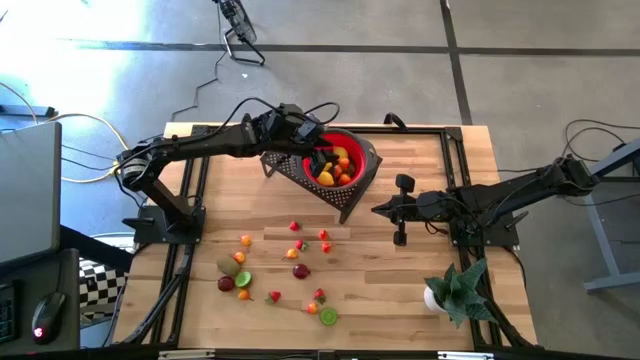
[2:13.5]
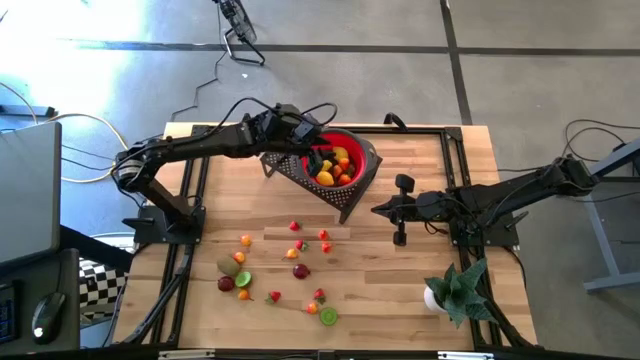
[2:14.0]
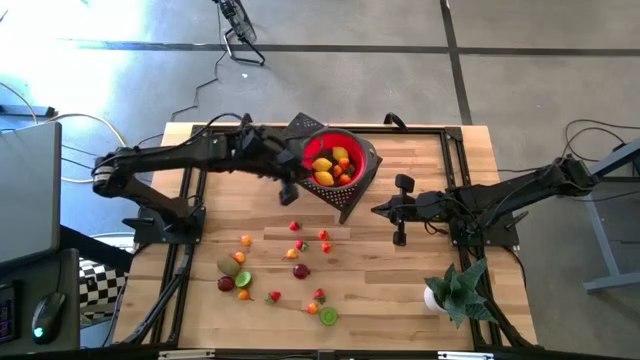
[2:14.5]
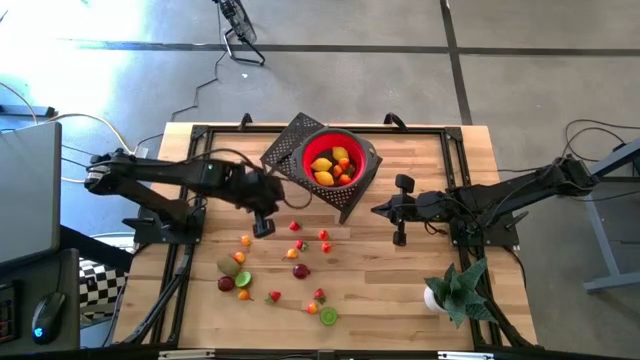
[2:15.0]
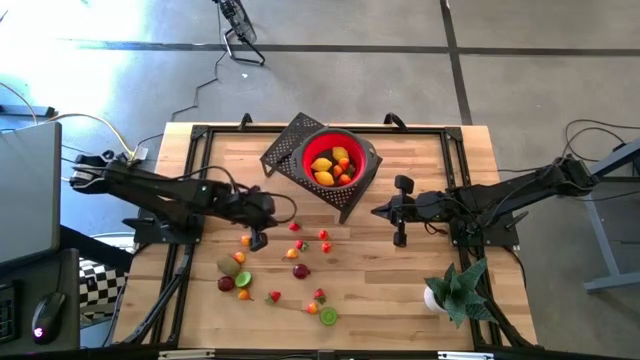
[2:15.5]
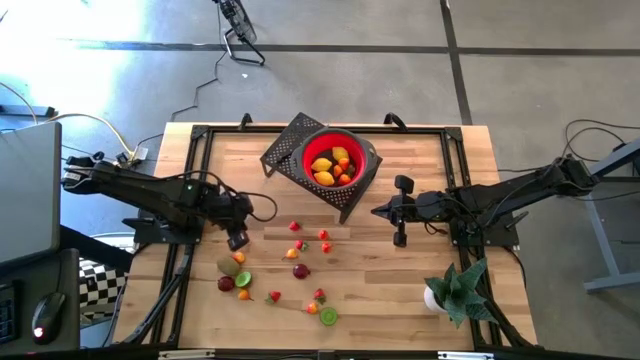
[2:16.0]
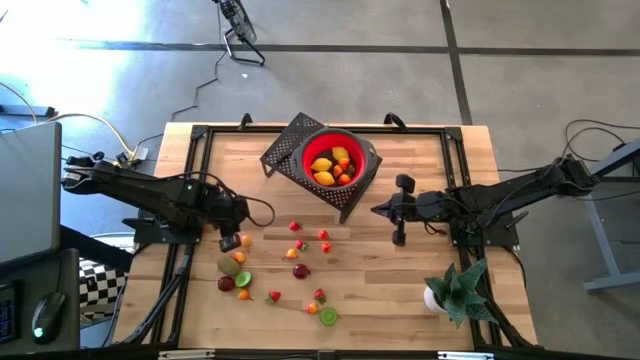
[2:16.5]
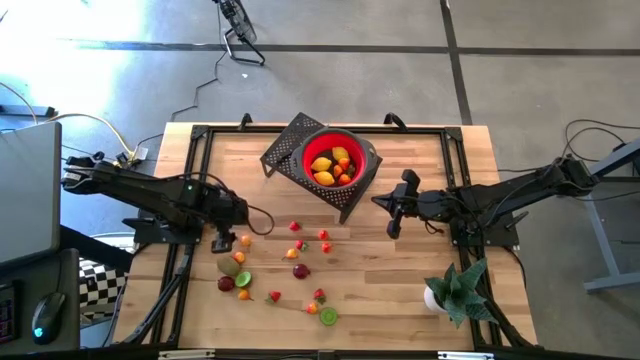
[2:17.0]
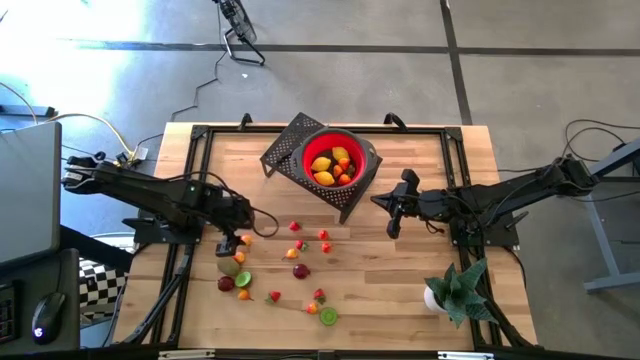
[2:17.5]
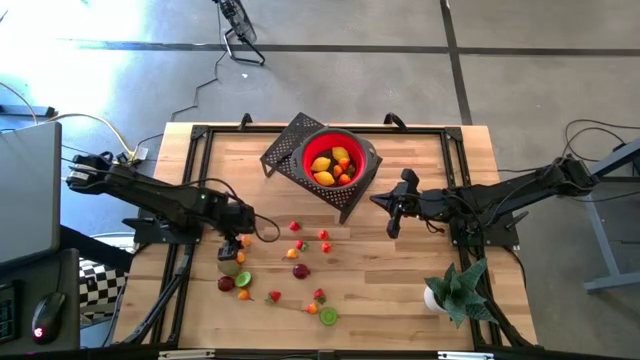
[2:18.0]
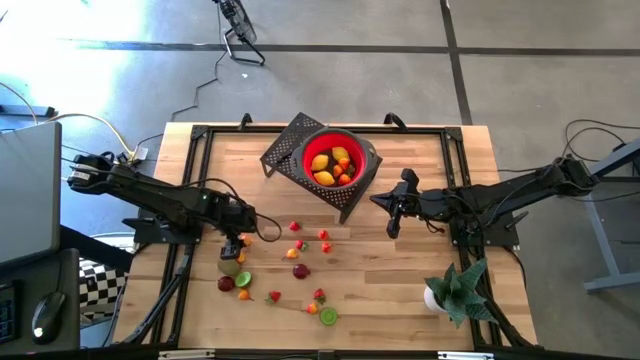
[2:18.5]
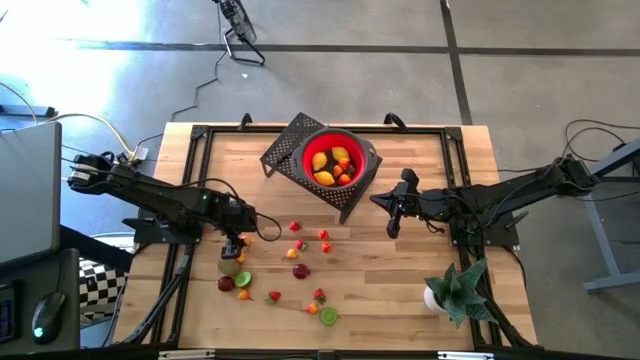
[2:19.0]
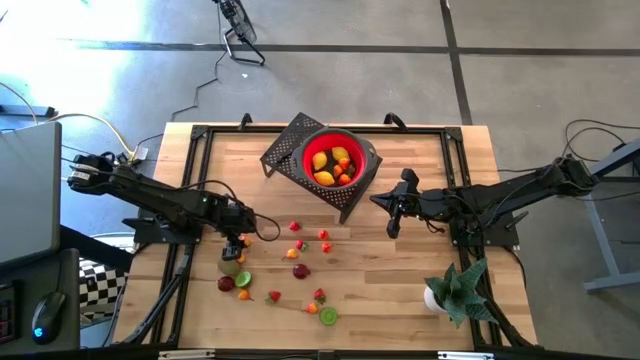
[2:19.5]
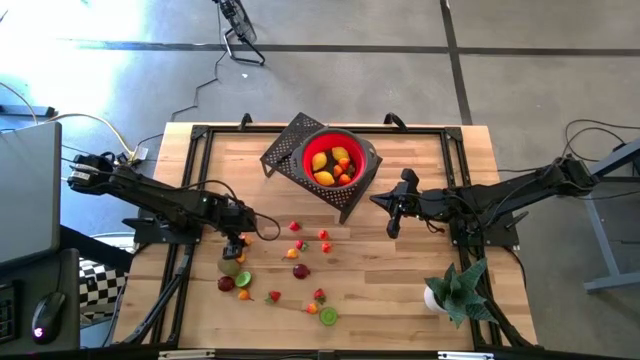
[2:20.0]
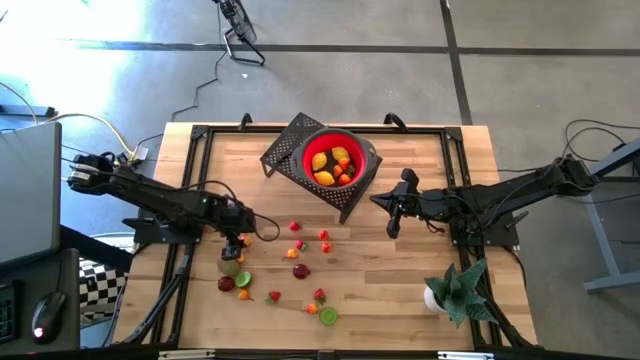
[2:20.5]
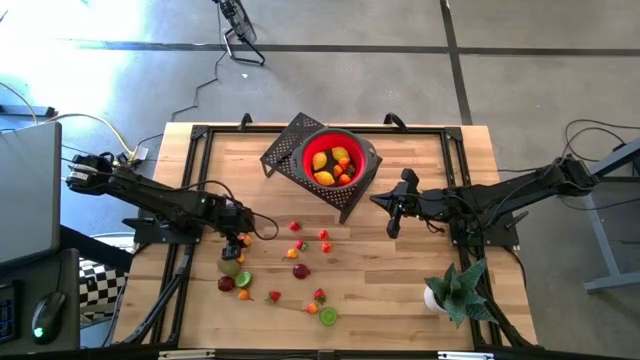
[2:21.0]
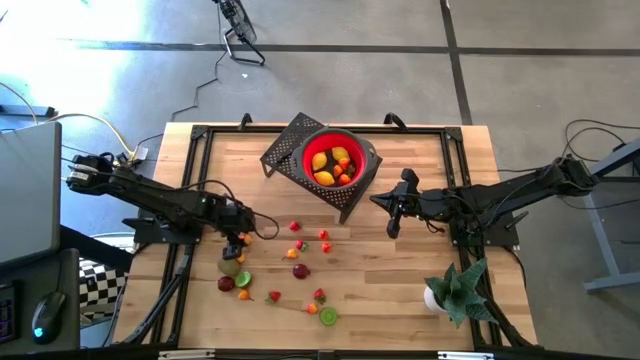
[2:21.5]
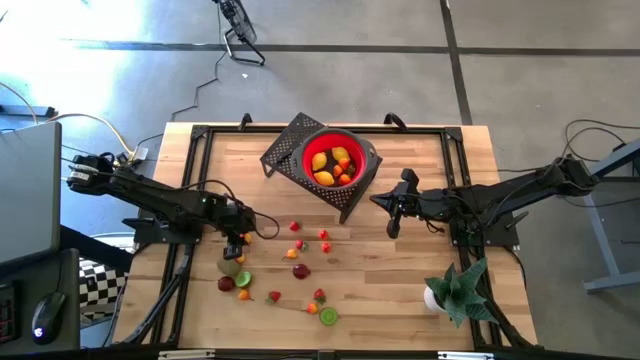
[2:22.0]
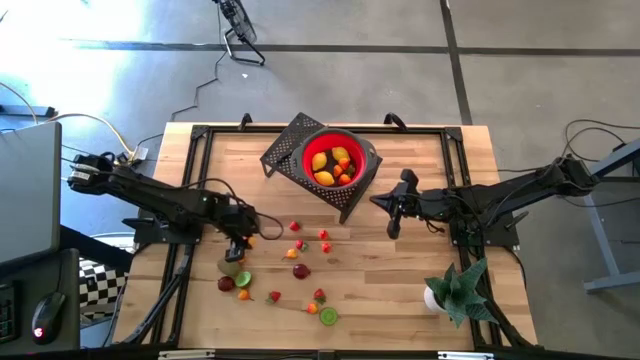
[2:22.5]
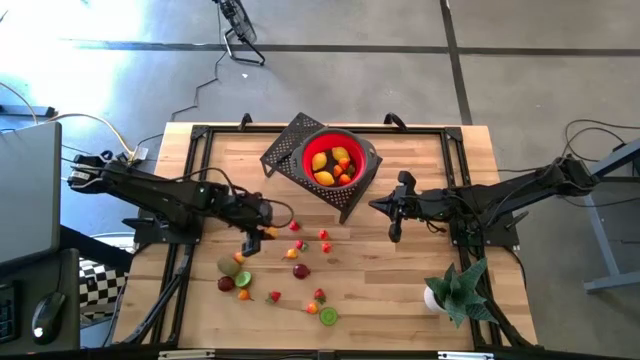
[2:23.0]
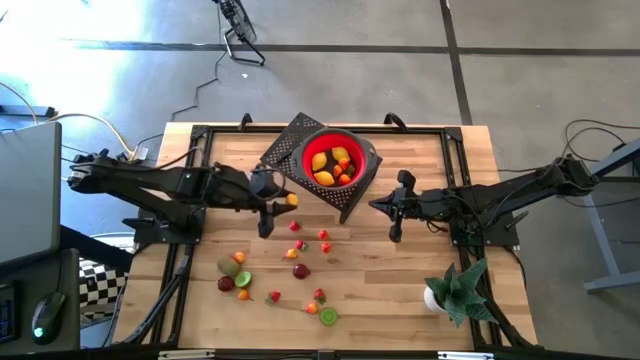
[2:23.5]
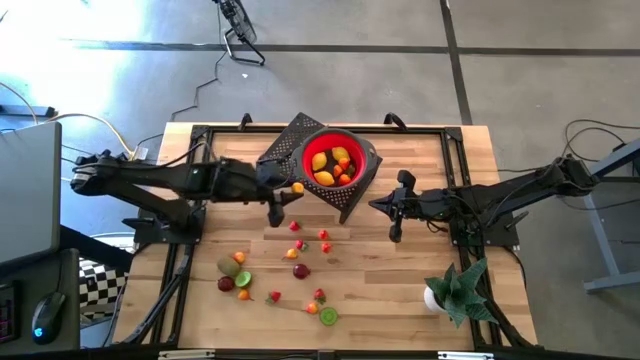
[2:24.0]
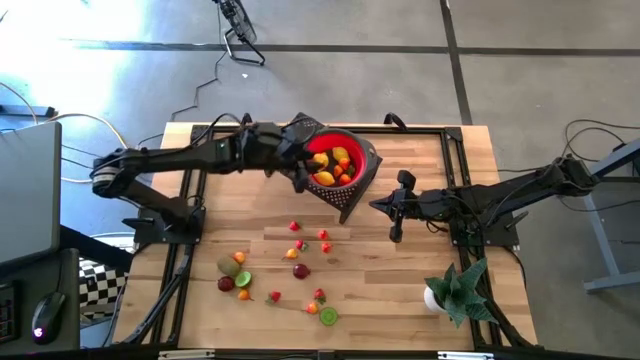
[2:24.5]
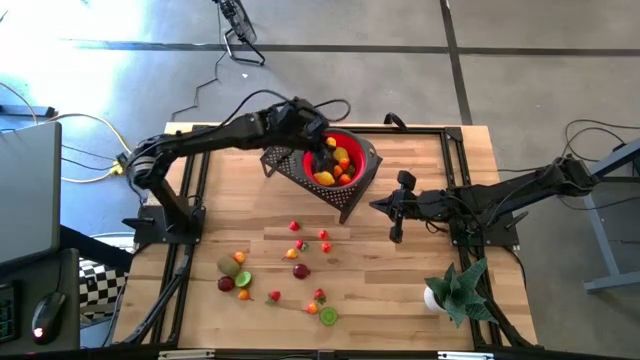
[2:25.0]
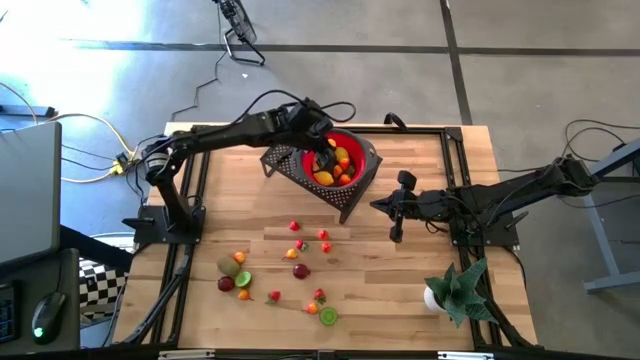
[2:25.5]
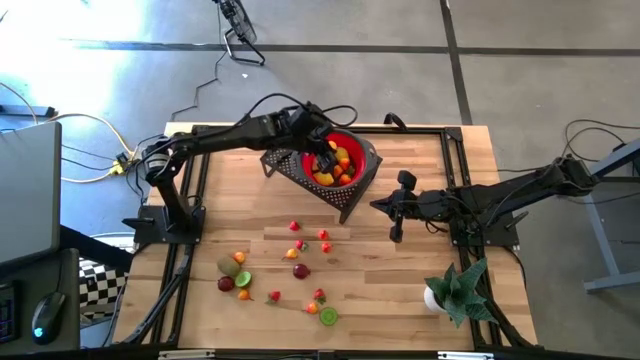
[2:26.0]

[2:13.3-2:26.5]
Task: Pick & Place Fruit
Put the pear into the strainer bowl on the shelf

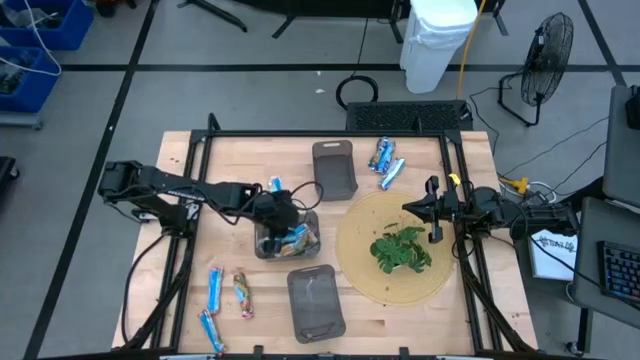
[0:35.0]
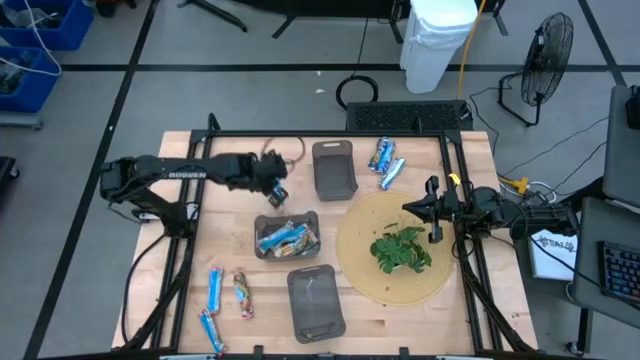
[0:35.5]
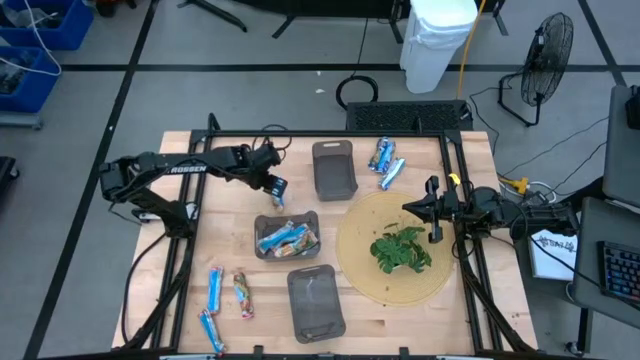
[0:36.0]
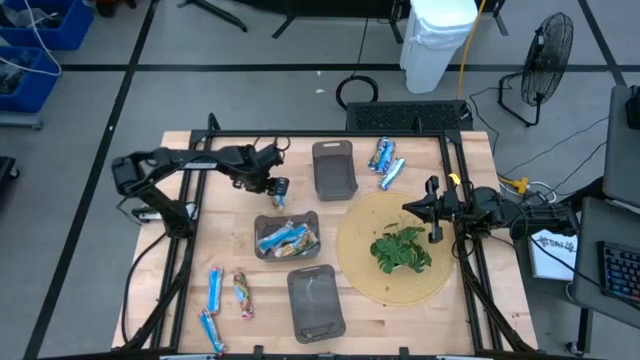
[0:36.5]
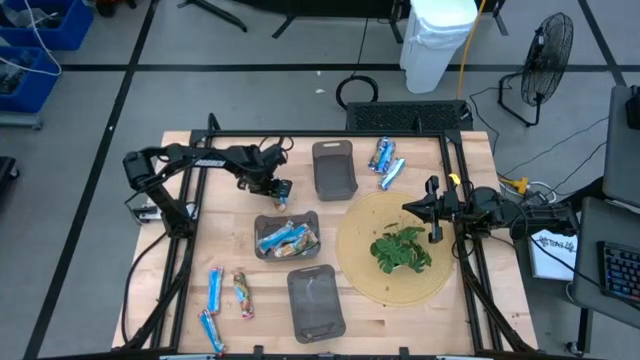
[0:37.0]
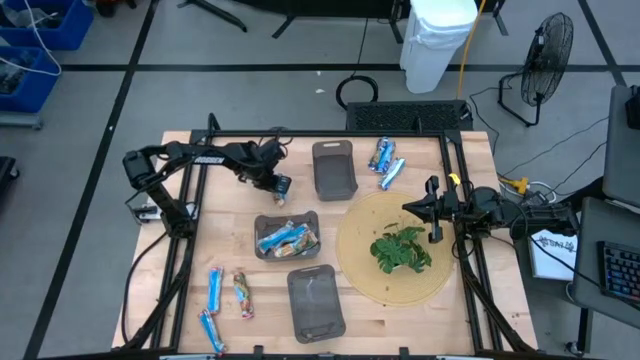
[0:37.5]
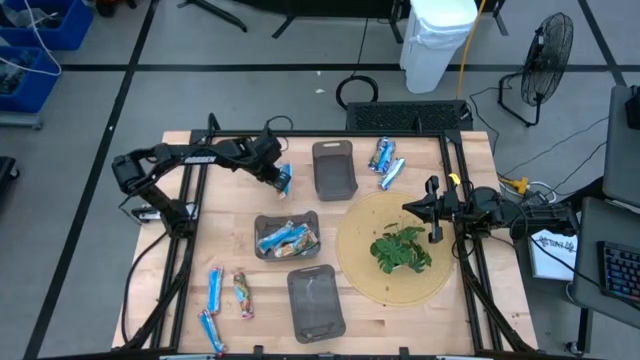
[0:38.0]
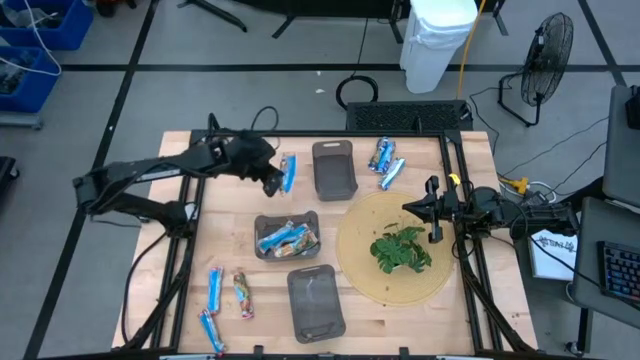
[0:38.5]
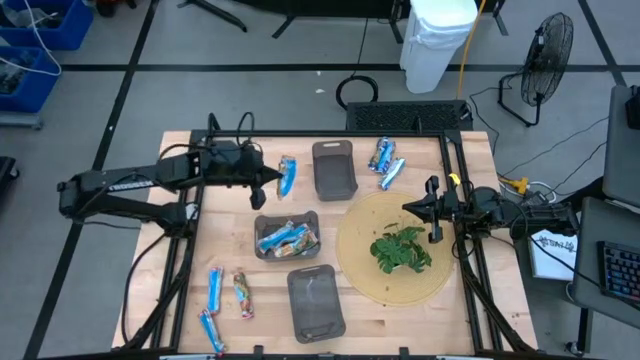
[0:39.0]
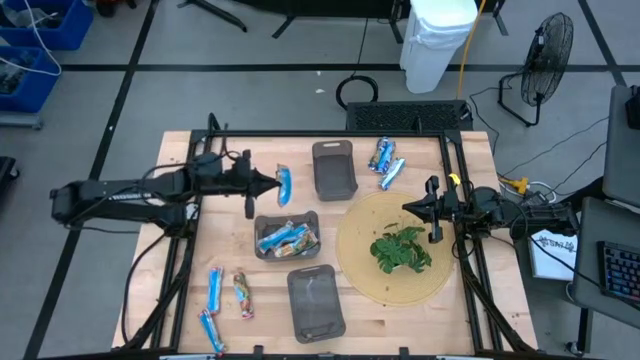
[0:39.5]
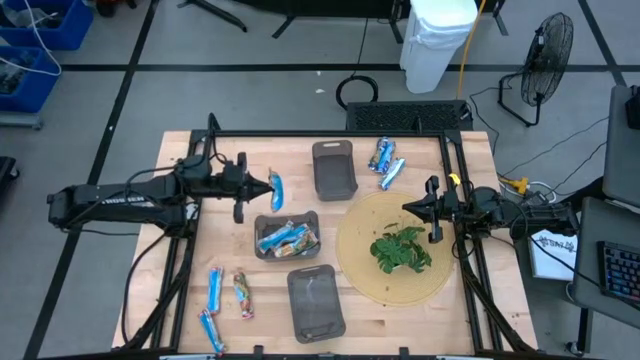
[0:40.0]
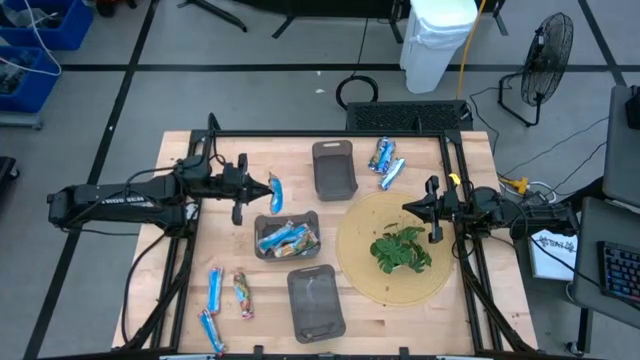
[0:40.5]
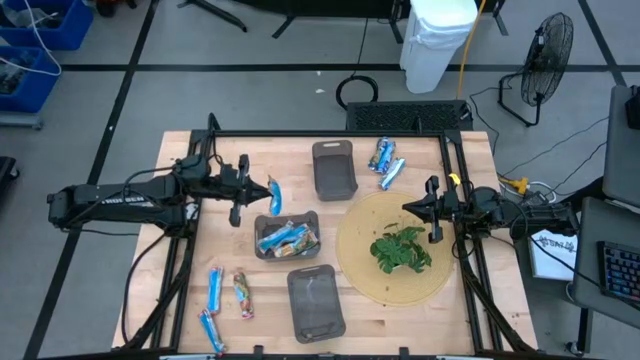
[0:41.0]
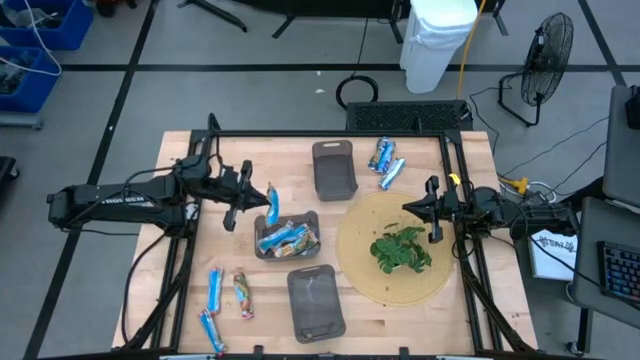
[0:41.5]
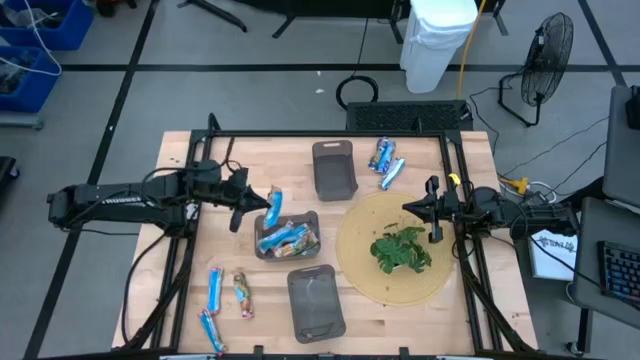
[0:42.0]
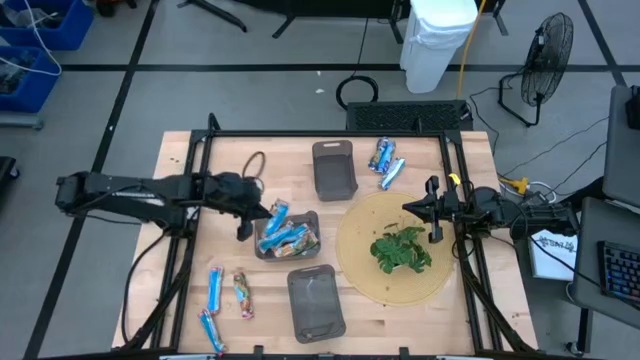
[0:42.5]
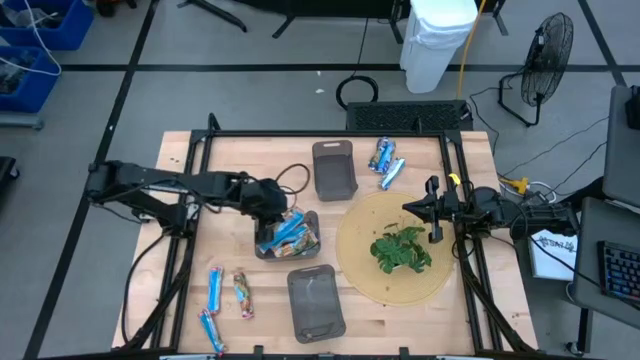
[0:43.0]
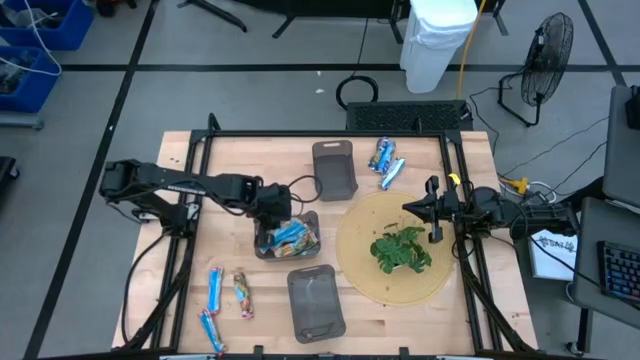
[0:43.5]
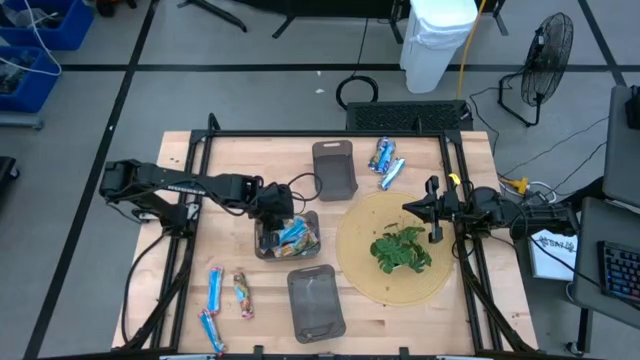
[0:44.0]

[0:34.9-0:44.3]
Task: Pick and place Granola Bars by type
Put the yellow granola bar into the middle black bin
